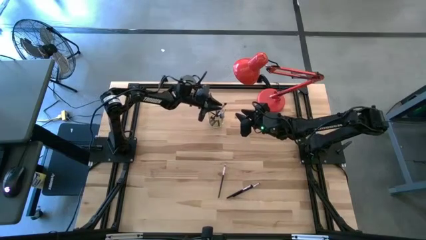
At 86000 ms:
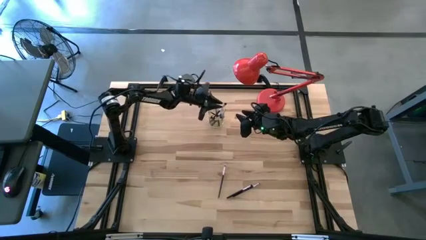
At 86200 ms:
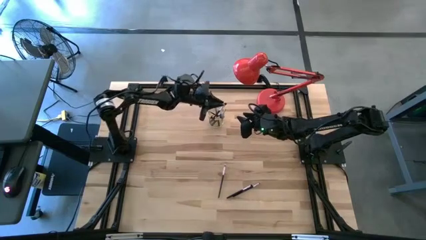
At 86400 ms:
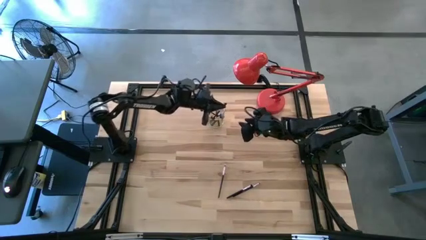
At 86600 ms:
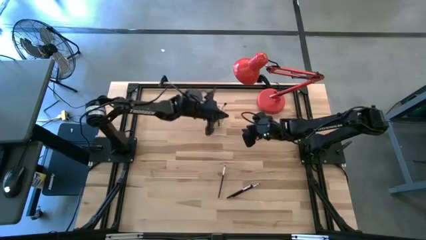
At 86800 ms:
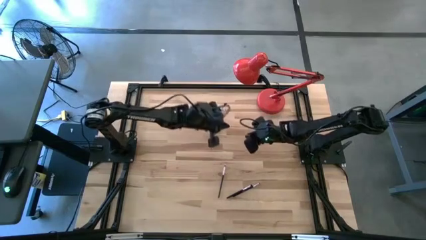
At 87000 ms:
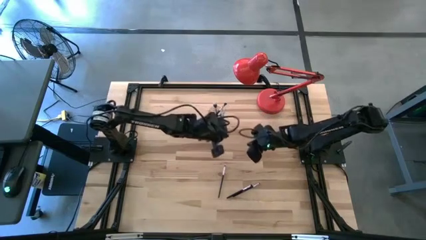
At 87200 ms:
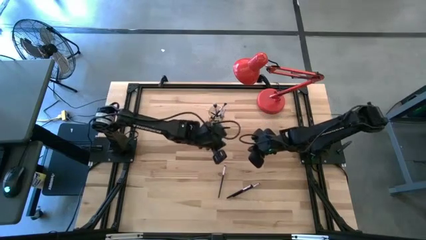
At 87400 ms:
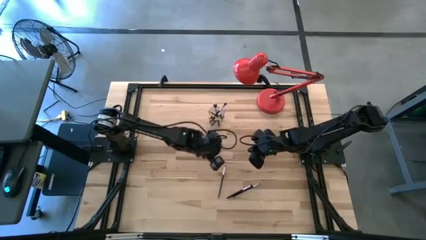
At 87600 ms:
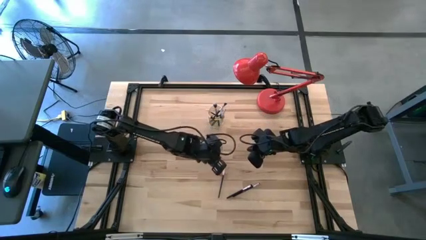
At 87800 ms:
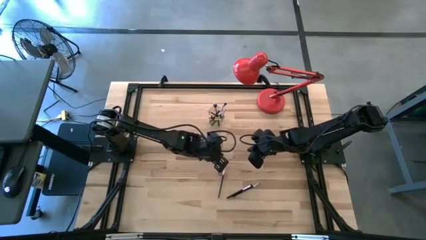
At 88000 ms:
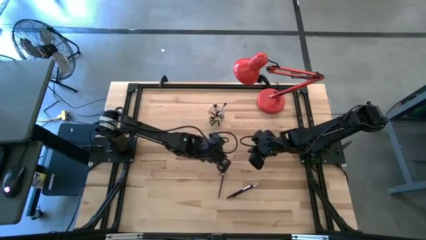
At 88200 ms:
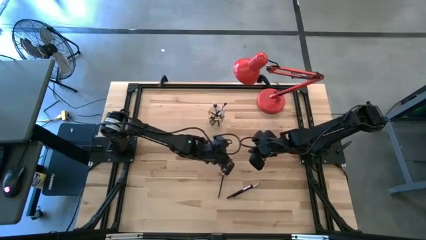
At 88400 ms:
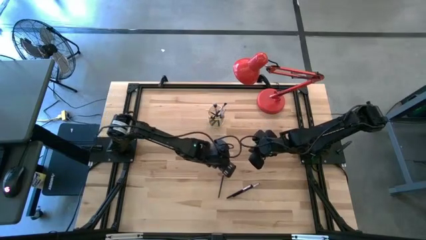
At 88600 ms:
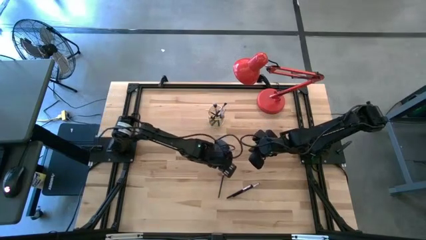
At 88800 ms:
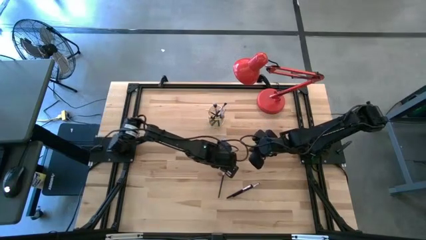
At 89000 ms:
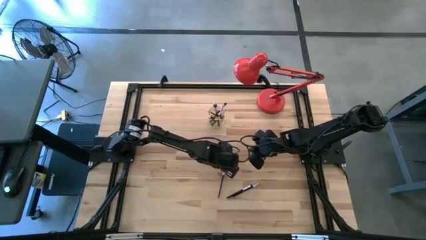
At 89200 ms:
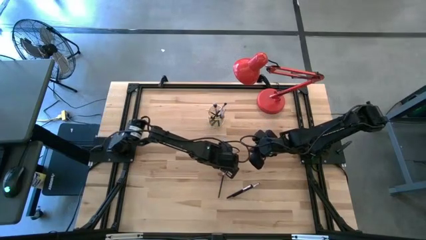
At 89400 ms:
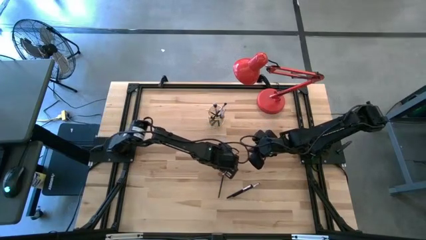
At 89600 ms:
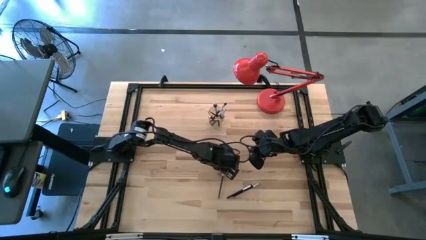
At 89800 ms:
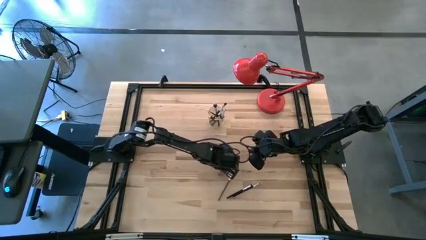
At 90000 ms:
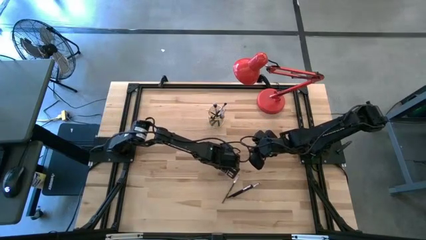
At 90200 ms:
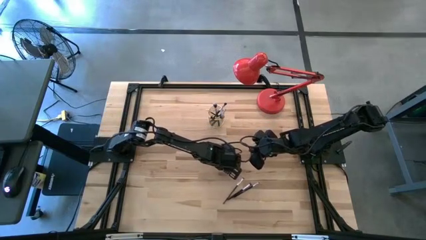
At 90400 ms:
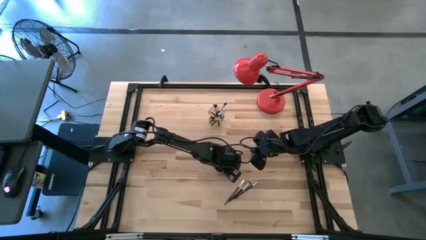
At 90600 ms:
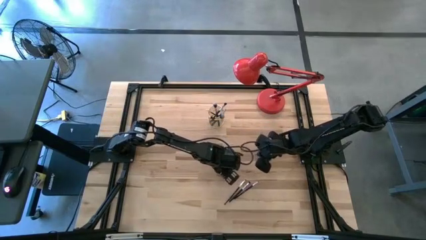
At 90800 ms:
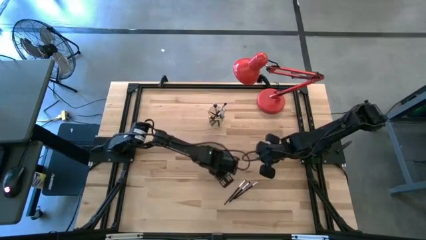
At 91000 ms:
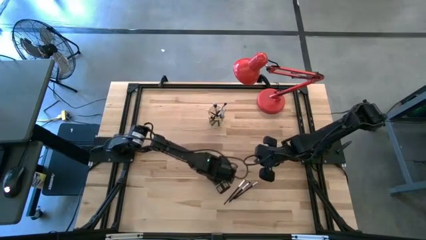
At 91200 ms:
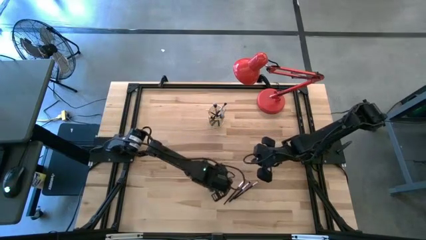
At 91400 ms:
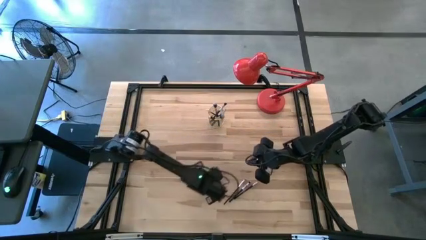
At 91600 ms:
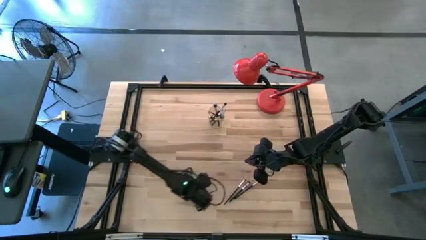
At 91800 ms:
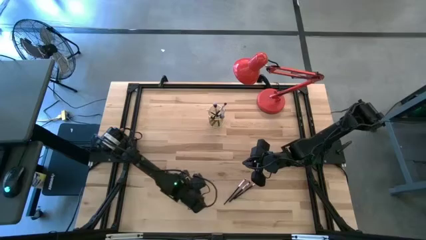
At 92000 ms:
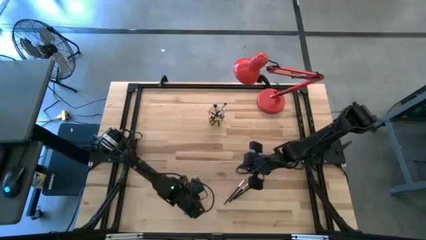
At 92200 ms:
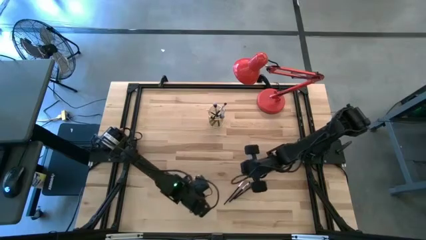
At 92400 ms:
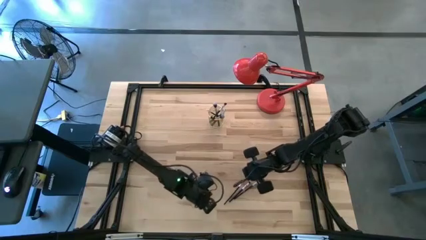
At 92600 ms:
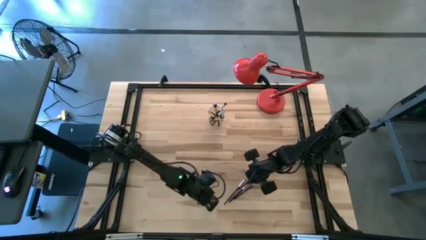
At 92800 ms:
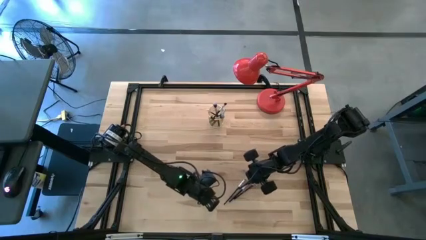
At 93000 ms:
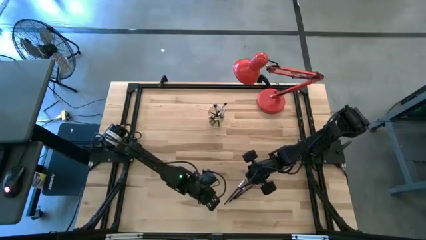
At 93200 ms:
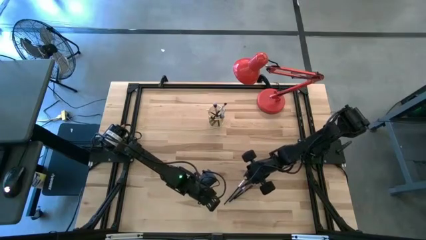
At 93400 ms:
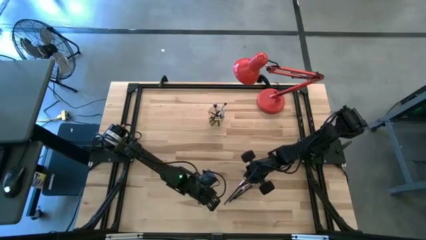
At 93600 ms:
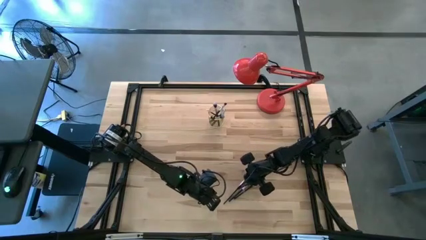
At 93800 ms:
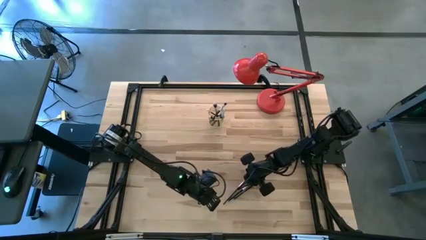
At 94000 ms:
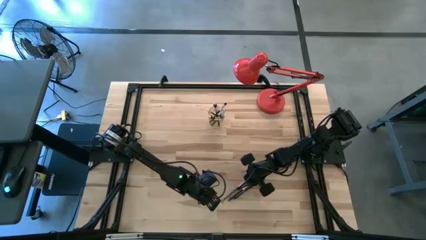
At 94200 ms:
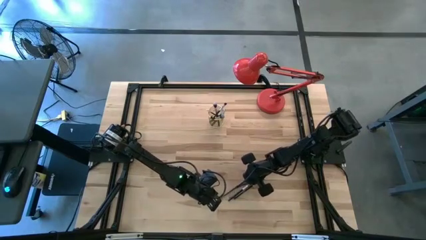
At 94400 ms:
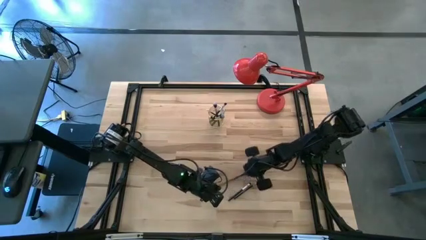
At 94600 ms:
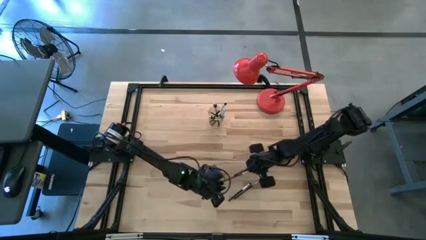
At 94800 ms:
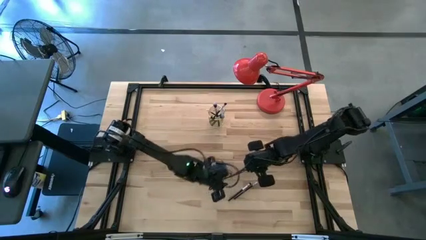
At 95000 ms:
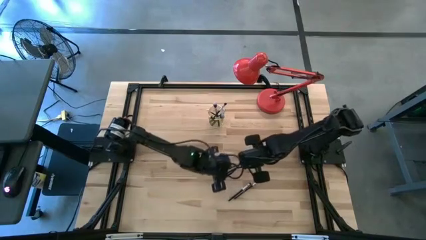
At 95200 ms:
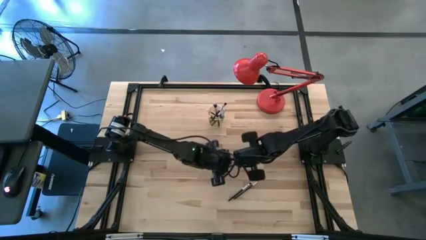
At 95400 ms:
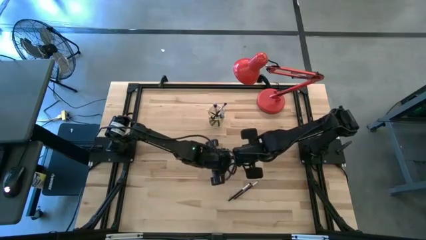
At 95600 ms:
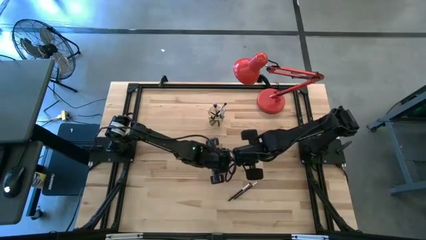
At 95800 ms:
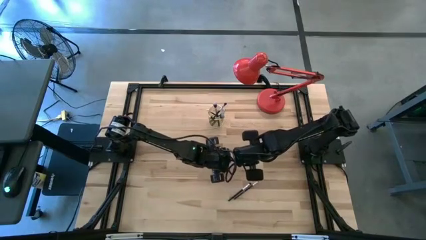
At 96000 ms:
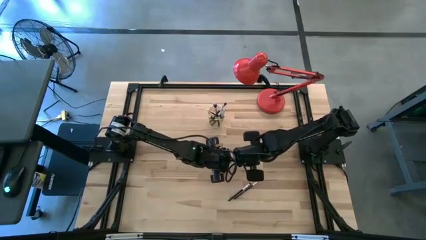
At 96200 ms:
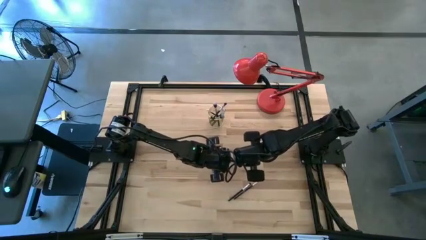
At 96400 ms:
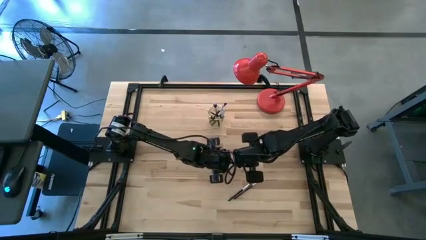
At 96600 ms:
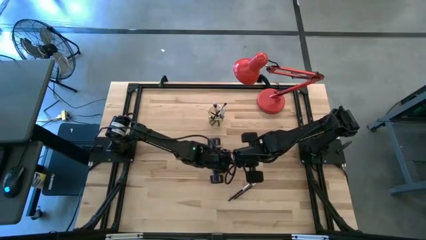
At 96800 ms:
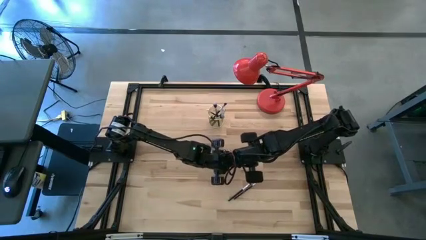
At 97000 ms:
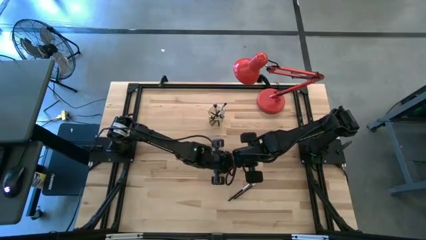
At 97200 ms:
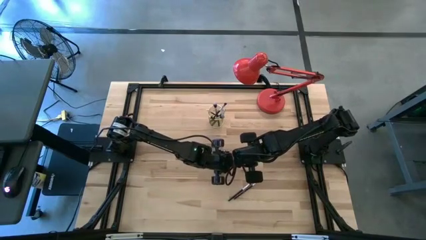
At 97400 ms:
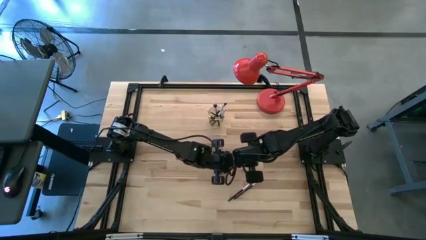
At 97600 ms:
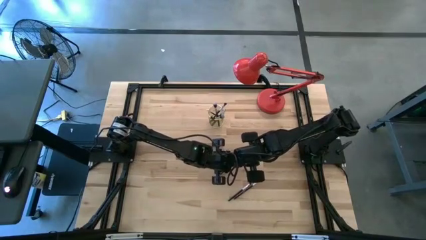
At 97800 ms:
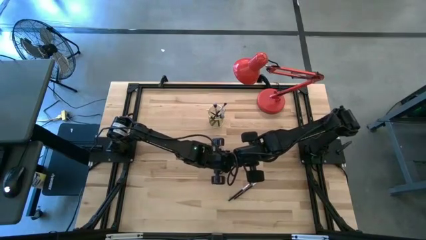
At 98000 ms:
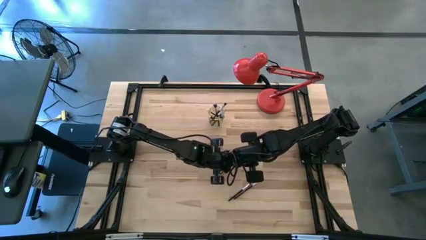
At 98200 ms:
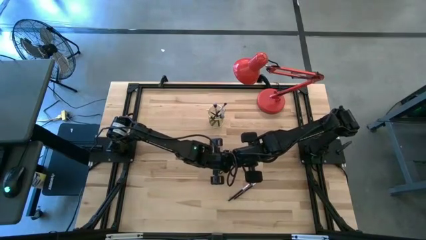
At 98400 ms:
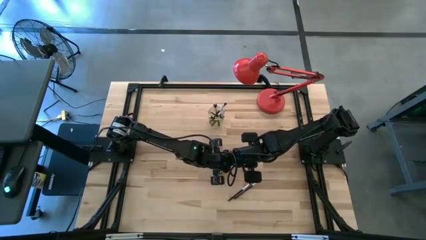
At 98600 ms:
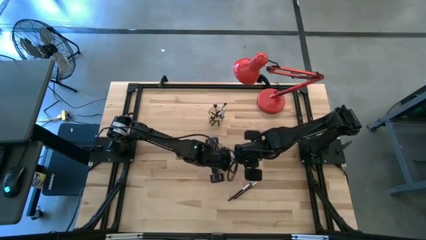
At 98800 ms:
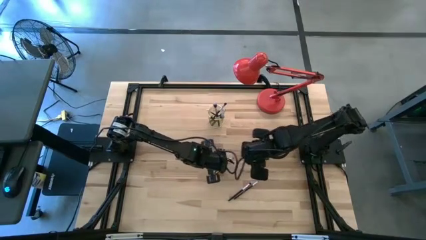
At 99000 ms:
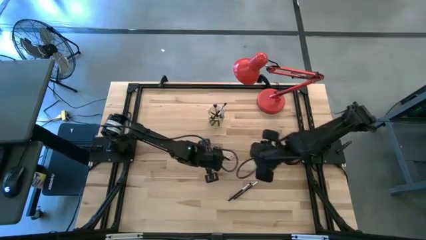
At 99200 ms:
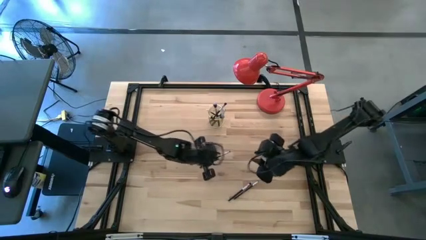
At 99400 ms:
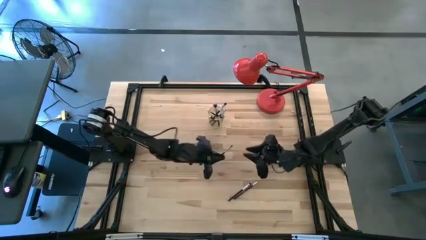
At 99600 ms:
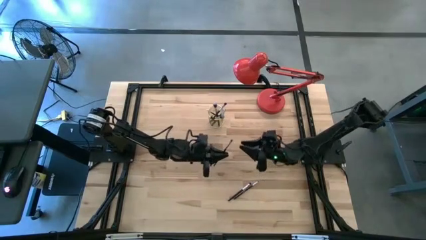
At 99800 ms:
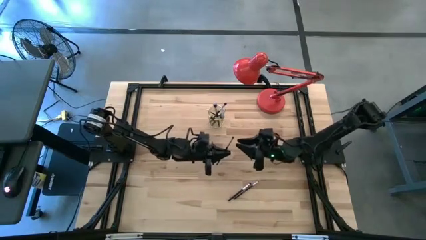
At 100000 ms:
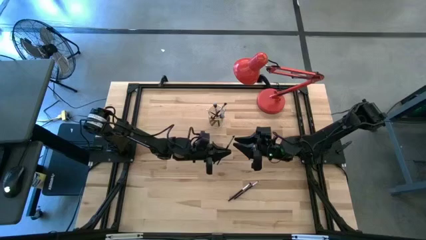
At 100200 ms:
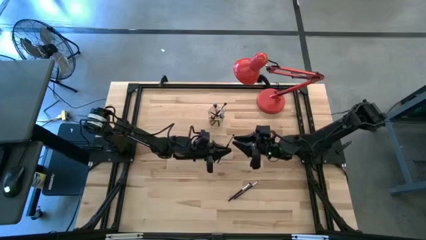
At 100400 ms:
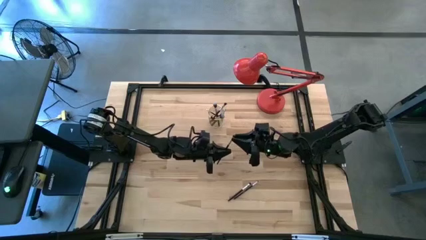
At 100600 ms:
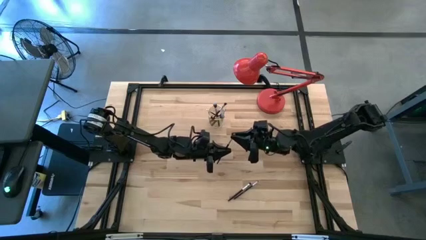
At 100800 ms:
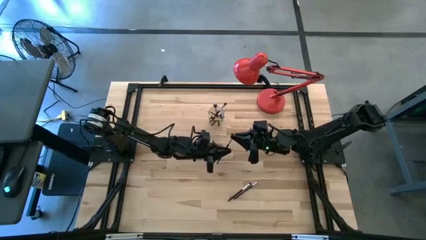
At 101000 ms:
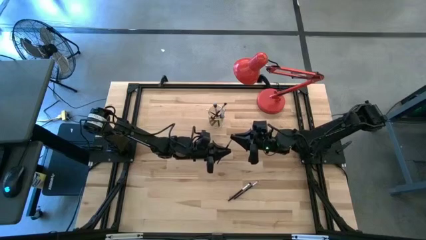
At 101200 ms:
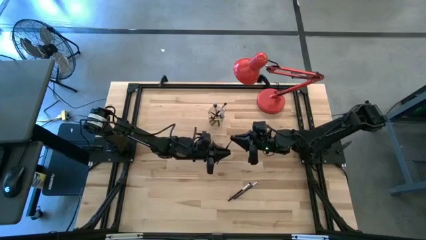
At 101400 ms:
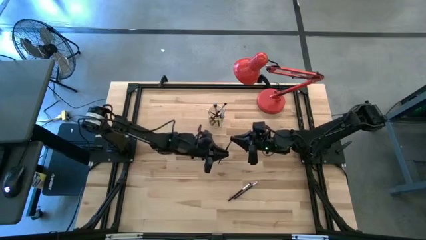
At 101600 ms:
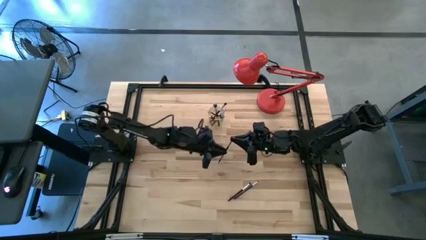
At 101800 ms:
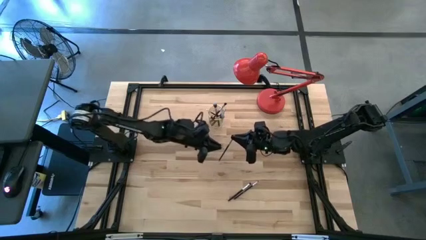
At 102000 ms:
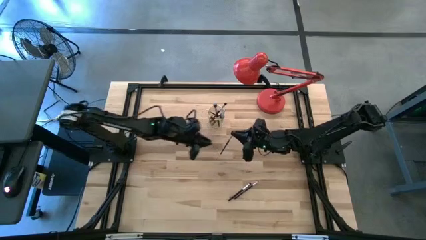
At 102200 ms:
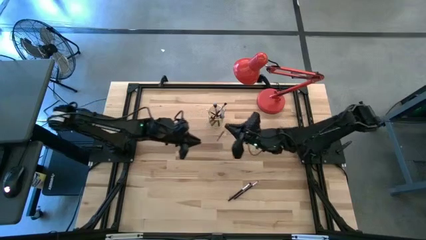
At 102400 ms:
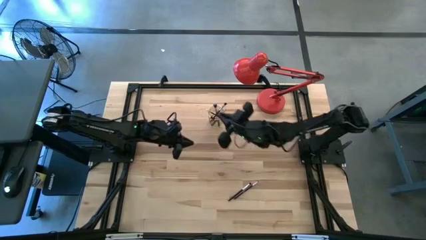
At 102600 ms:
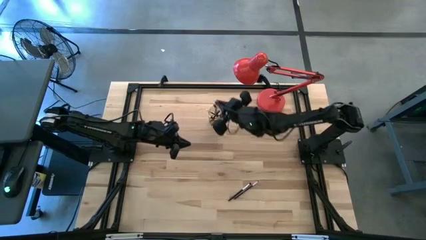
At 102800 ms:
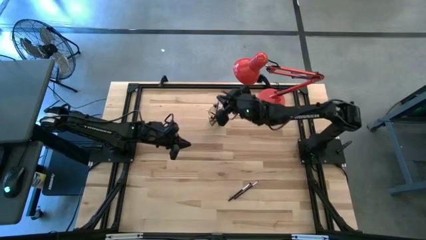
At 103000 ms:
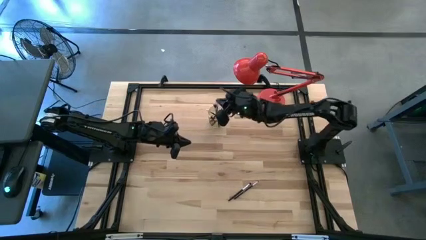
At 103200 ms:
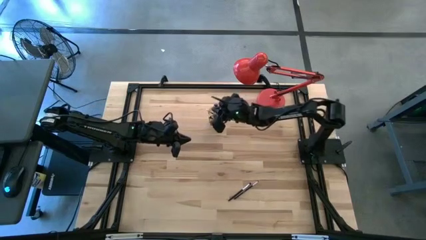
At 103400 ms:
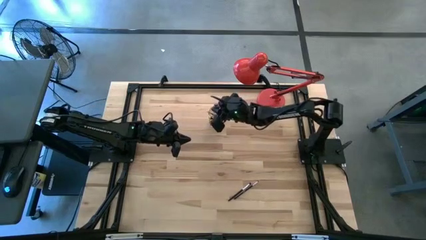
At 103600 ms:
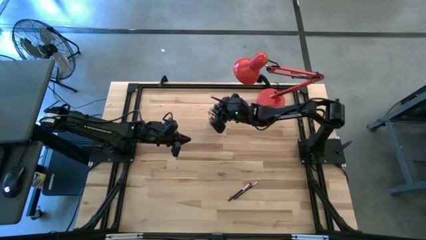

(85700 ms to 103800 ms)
Task: Pick & Place Makeup Brushes
Put the eyeshadow brush into the makeup brush holder
